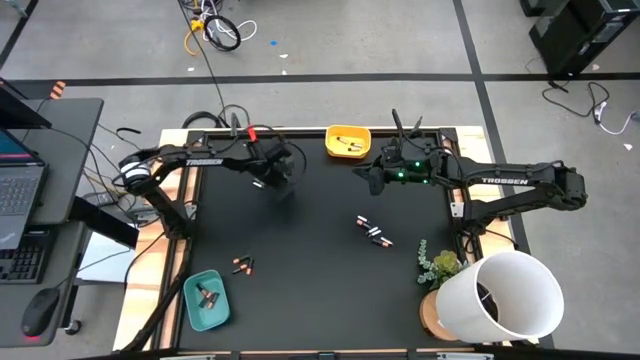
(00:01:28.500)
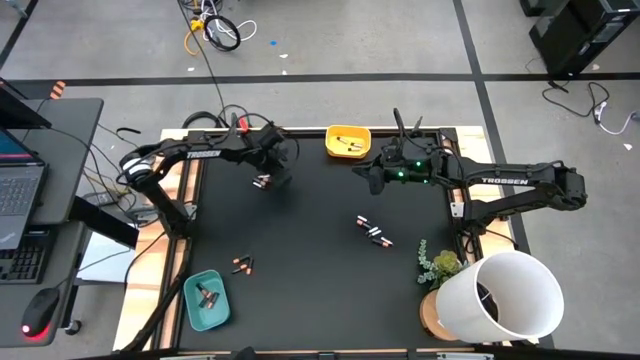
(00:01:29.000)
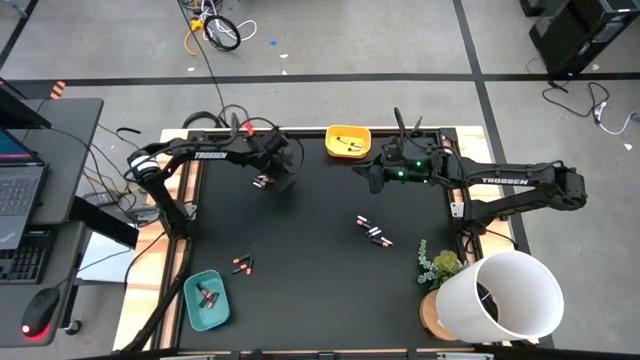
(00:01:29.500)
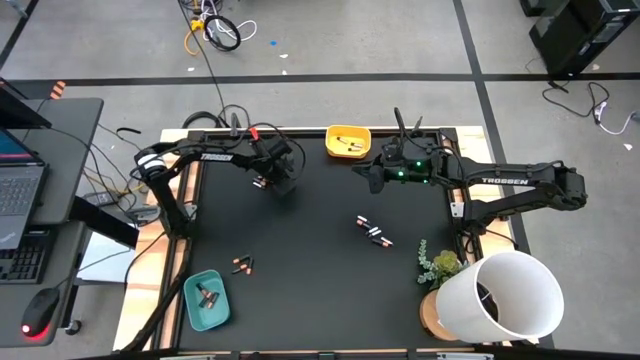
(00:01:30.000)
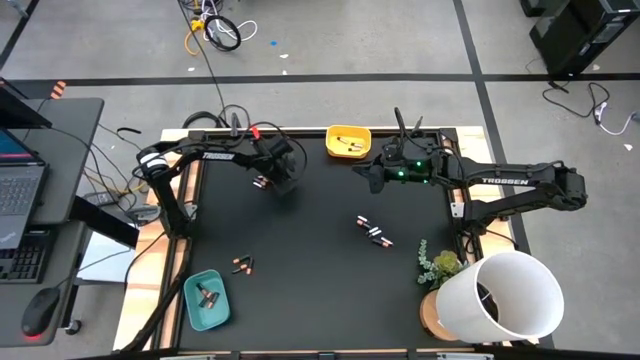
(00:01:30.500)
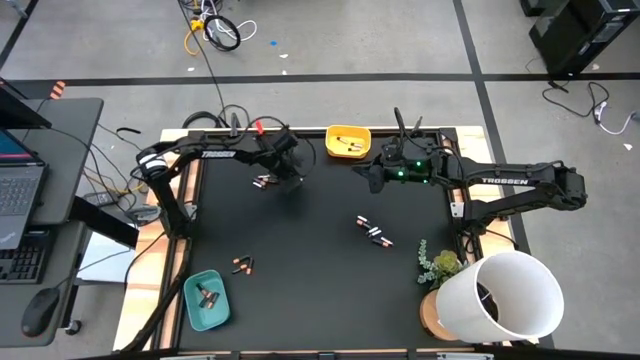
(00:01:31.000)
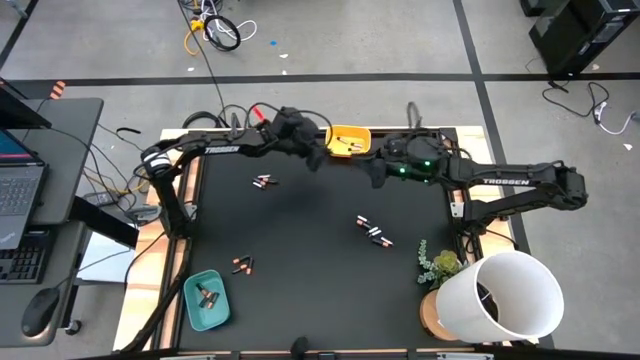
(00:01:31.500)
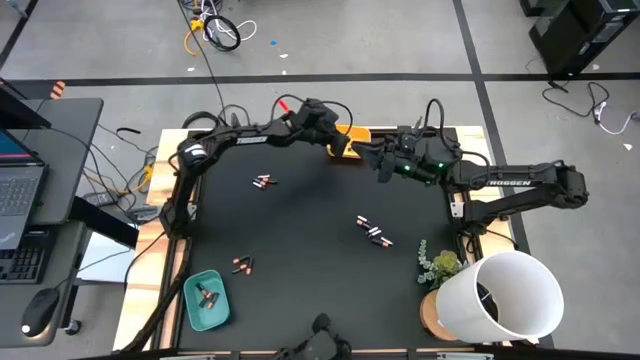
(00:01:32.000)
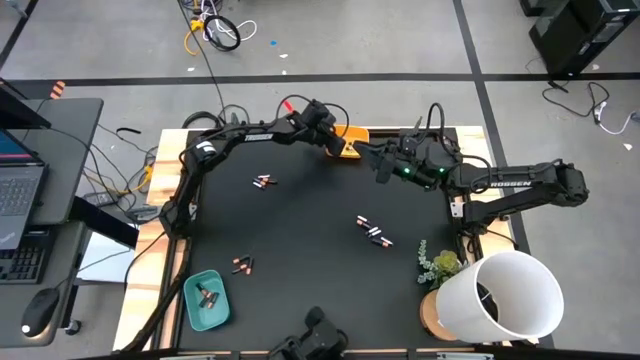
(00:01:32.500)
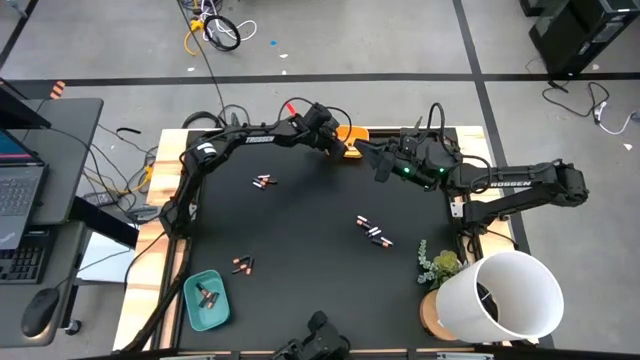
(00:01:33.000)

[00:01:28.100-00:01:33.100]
Task: Sort batteries
Put the silver battery into the yellow bin

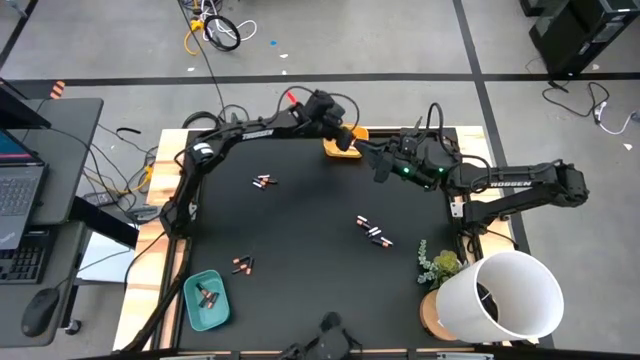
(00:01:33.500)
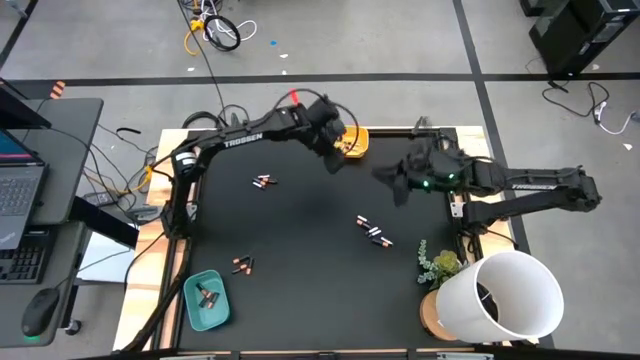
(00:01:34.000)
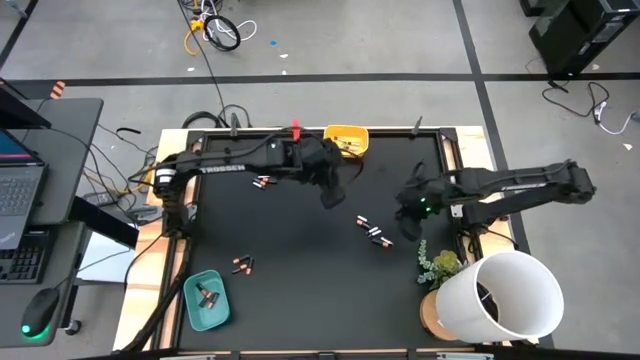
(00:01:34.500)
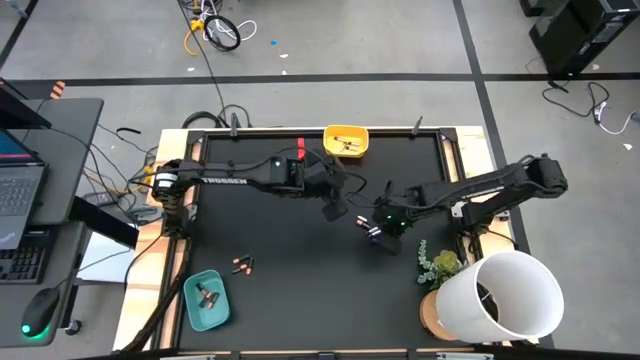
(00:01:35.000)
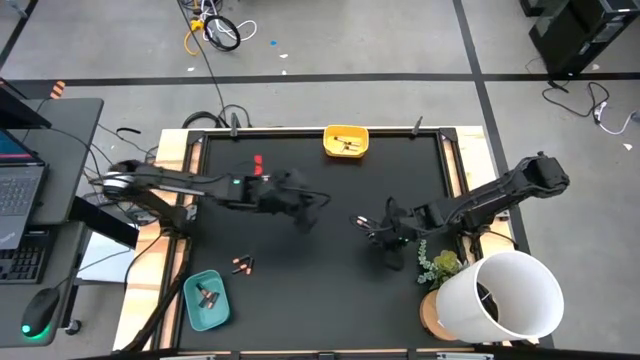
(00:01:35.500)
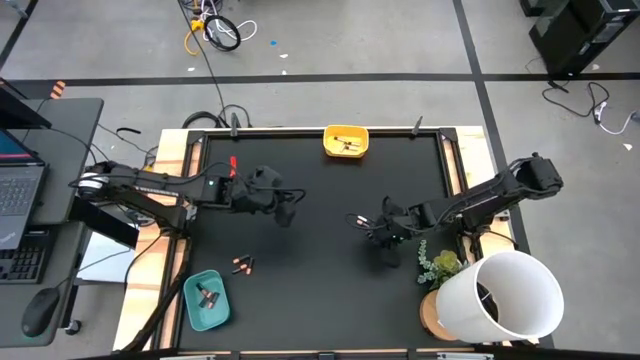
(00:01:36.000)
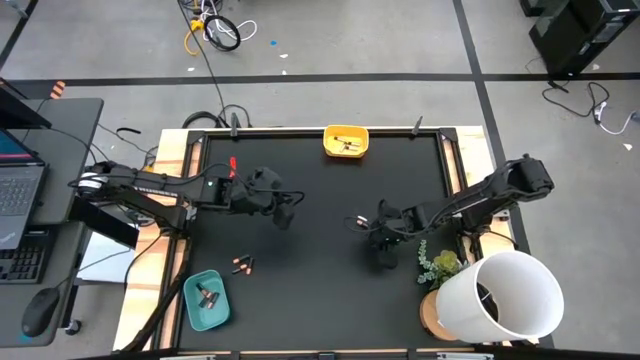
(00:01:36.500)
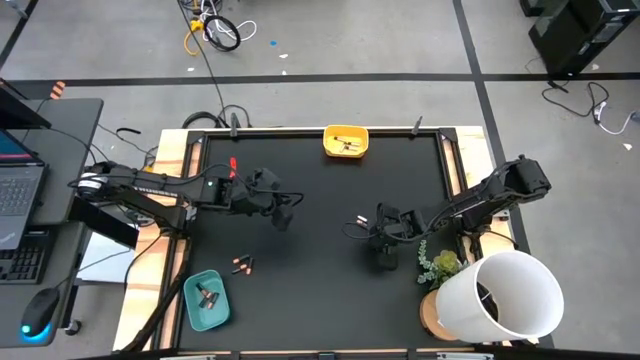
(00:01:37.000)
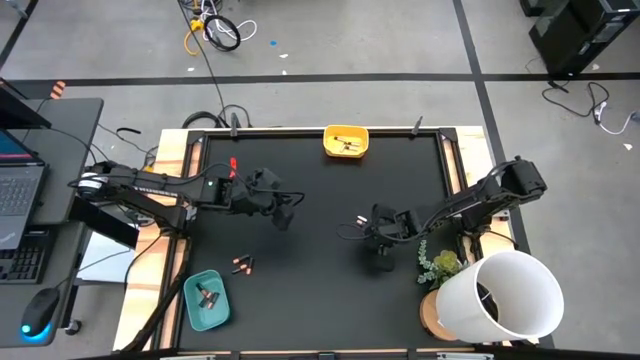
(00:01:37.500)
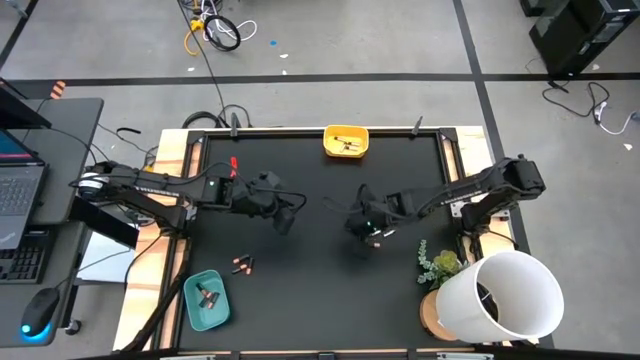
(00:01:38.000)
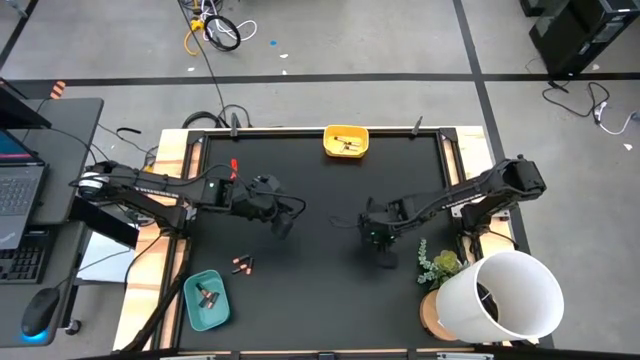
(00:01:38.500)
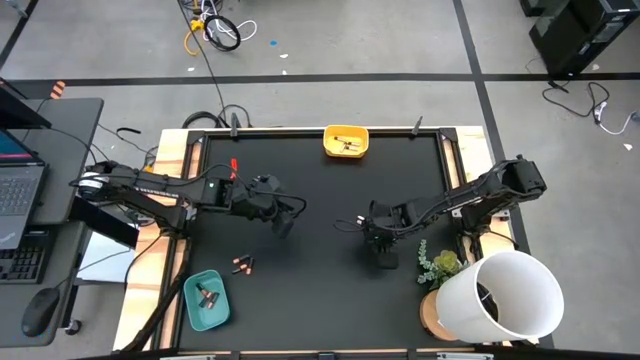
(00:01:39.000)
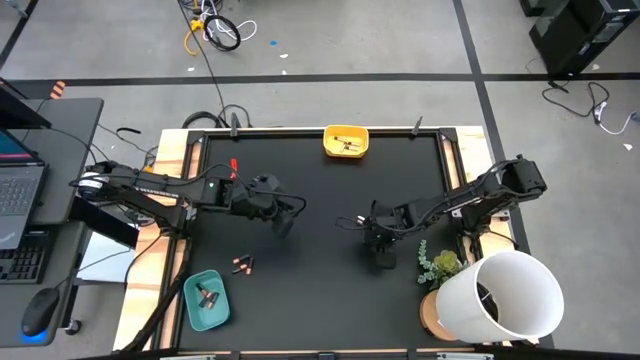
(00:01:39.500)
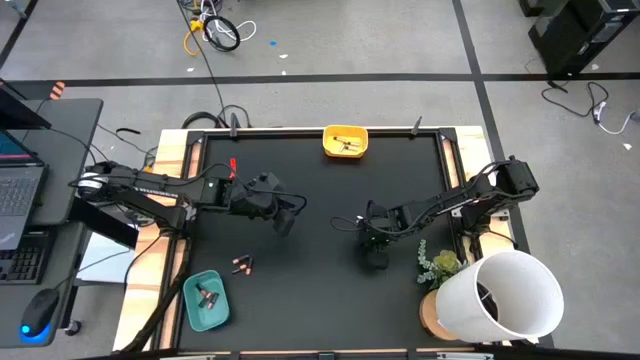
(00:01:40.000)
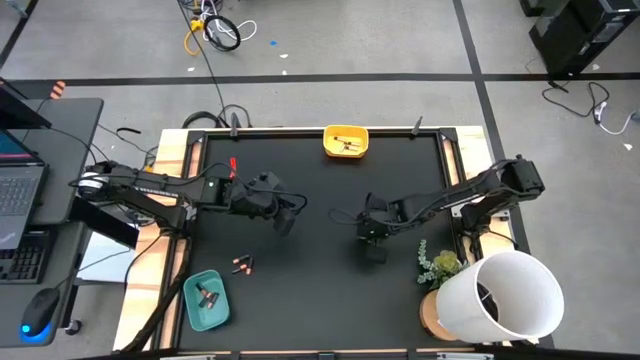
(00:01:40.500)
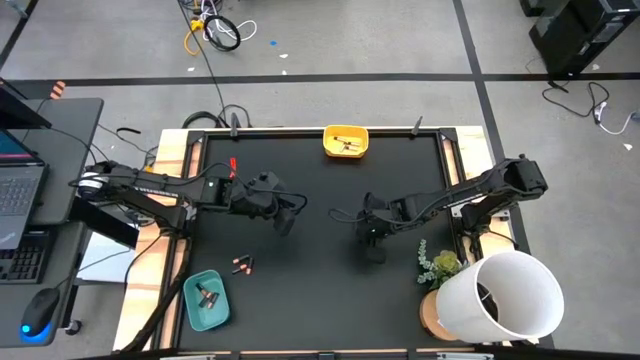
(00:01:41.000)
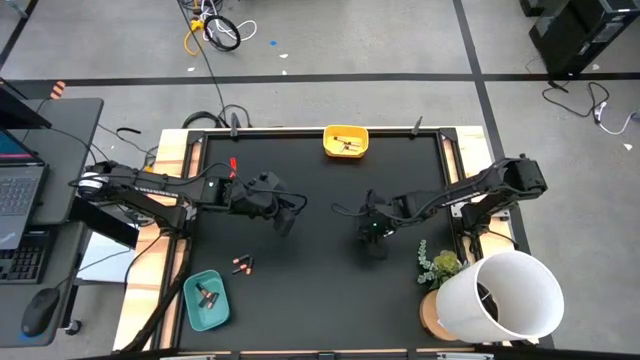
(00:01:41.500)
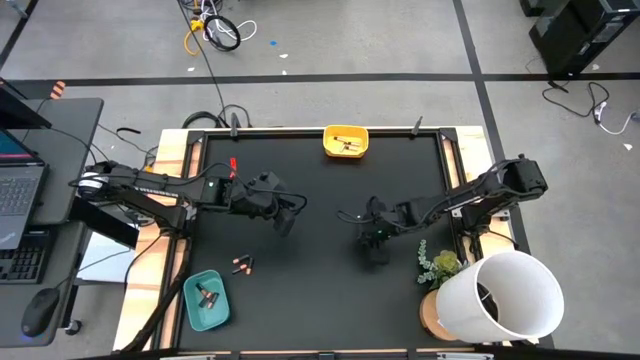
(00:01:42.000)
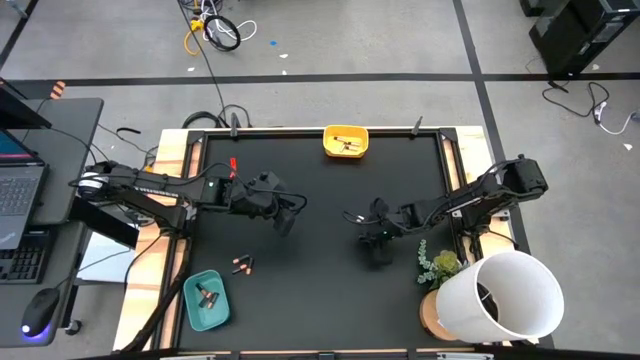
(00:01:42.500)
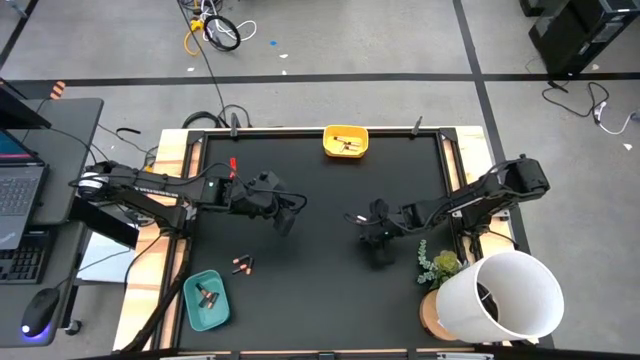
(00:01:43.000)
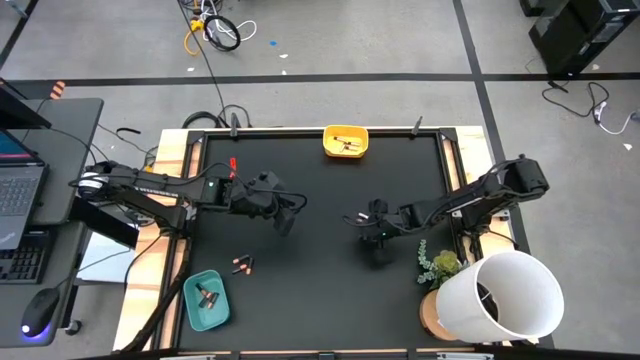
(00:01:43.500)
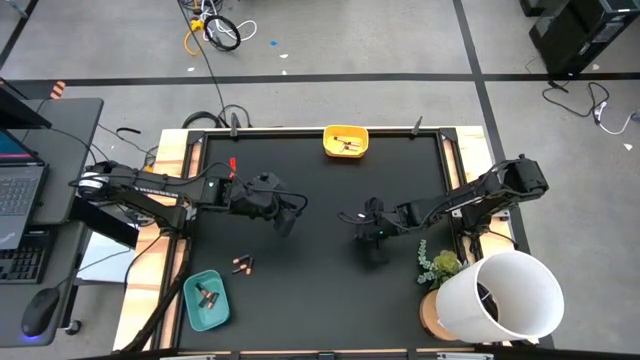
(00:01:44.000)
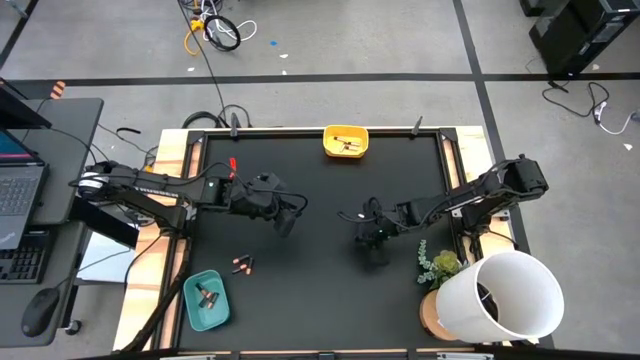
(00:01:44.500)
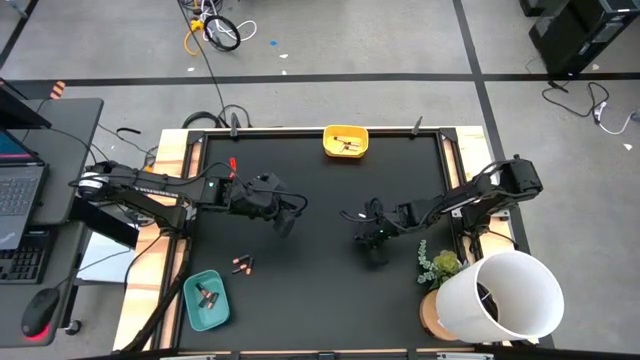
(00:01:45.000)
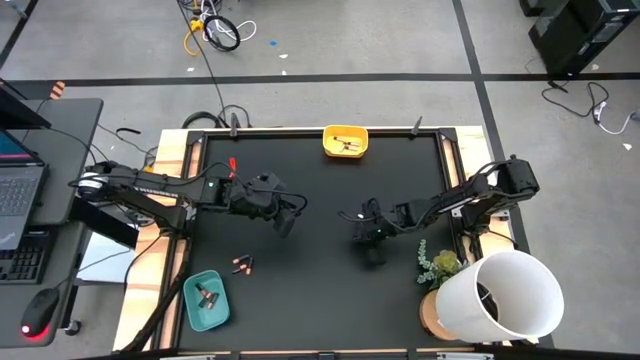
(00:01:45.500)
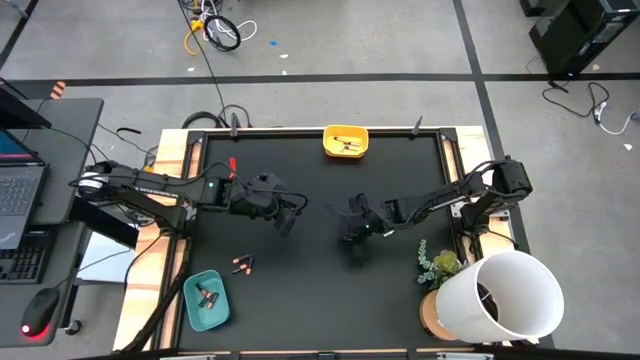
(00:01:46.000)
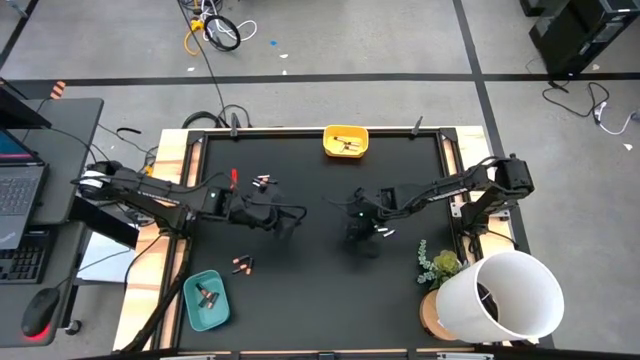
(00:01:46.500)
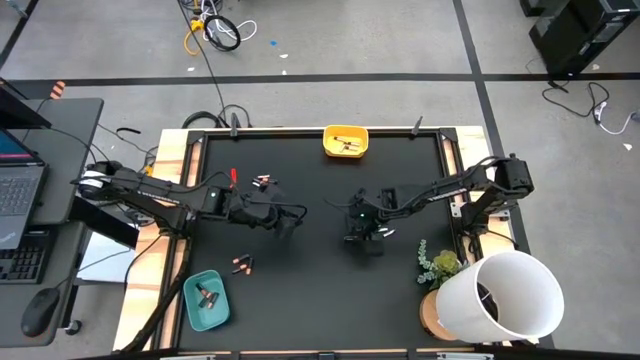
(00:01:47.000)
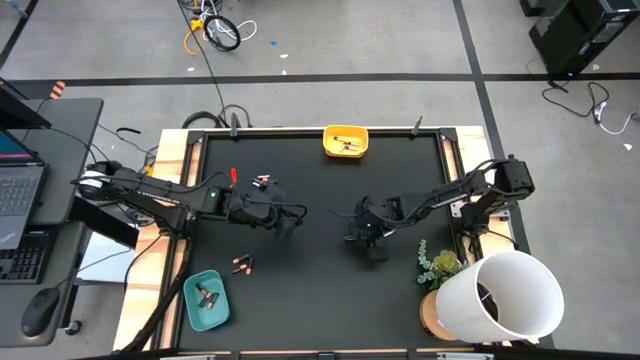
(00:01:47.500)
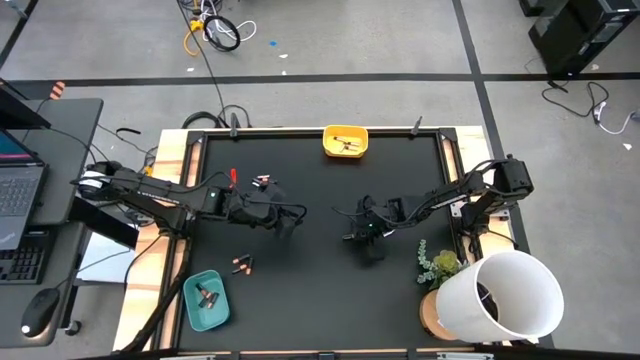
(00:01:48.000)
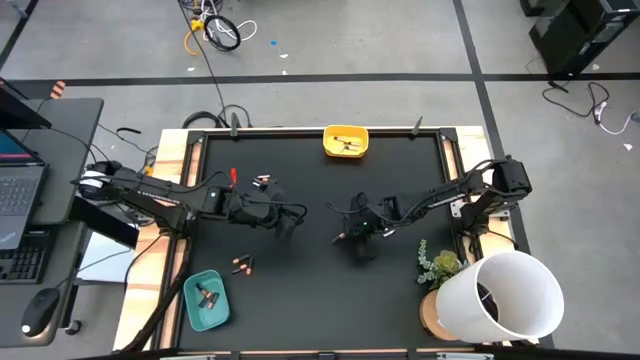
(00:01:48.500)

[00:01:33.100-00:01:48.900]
Put the black battery into the green bin

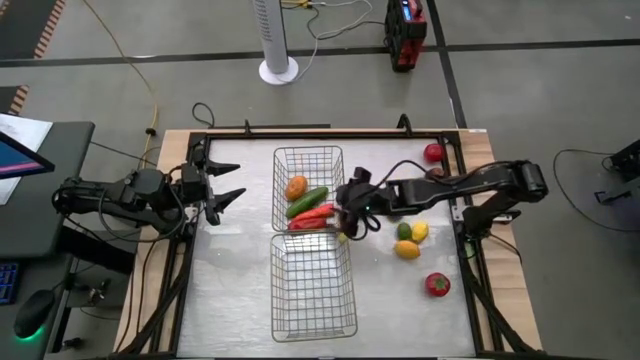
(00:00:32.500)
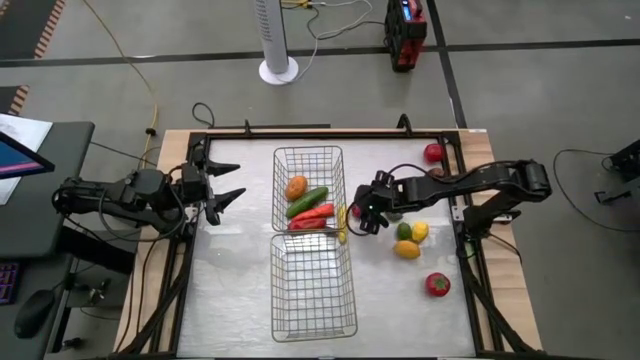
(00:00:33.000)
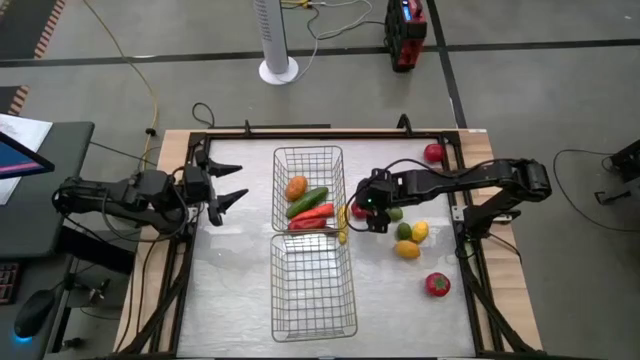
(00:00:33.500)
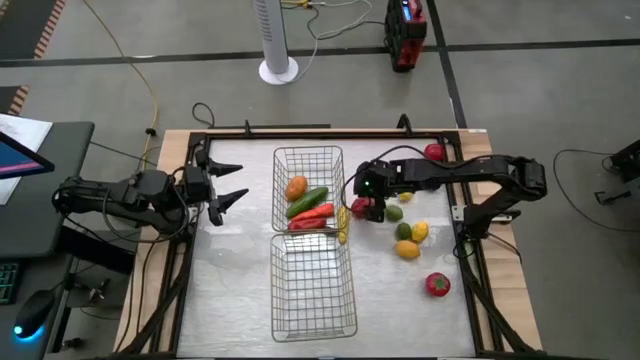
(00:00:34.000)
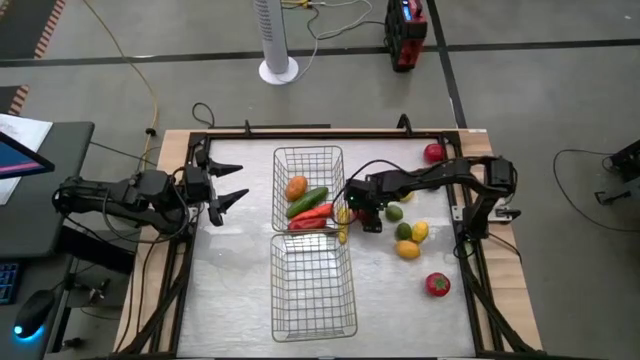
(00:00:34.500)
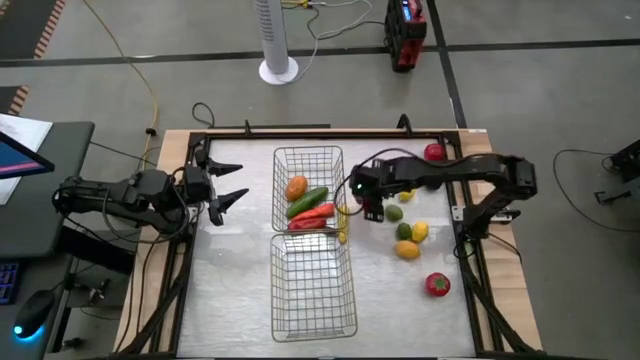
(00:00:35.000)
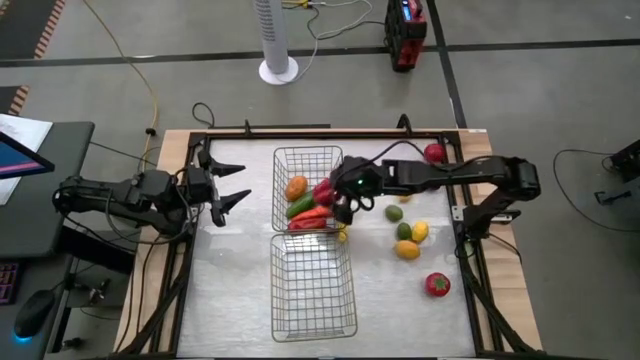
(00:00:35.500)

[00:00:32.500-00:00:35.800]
Task: Sort produce into baskets
Put the red bell pepper into the top wire basket
